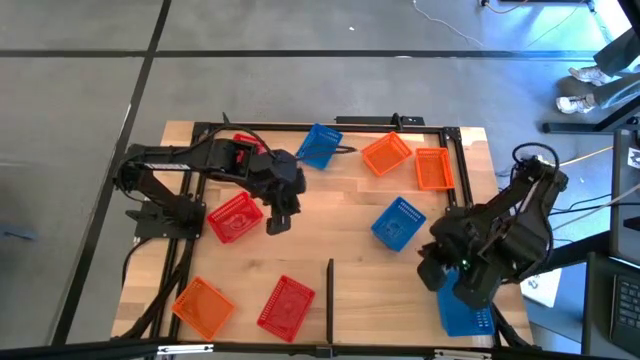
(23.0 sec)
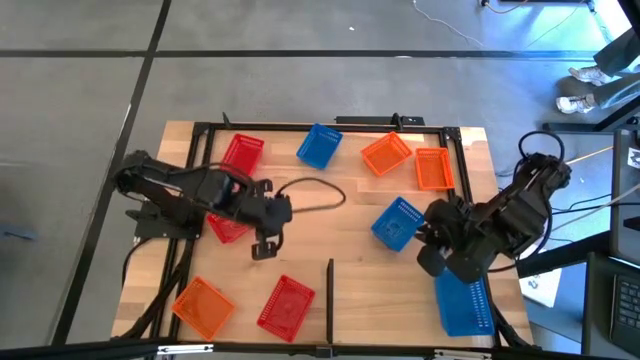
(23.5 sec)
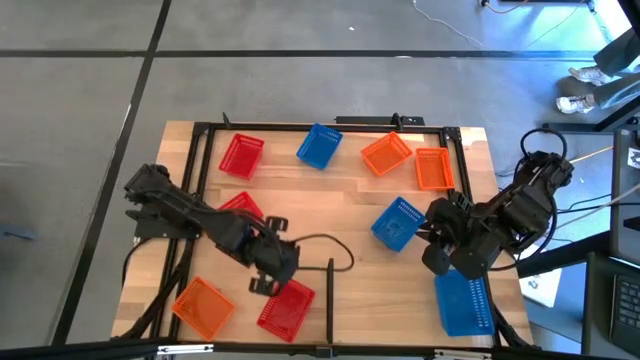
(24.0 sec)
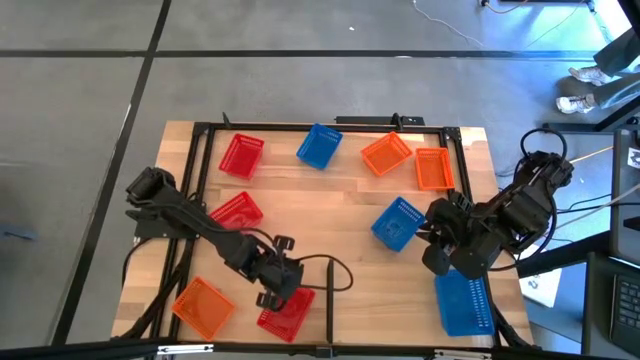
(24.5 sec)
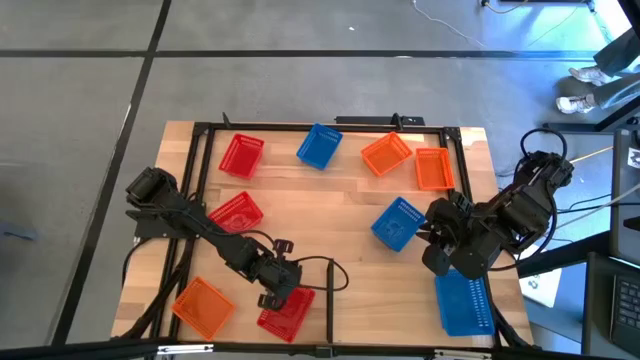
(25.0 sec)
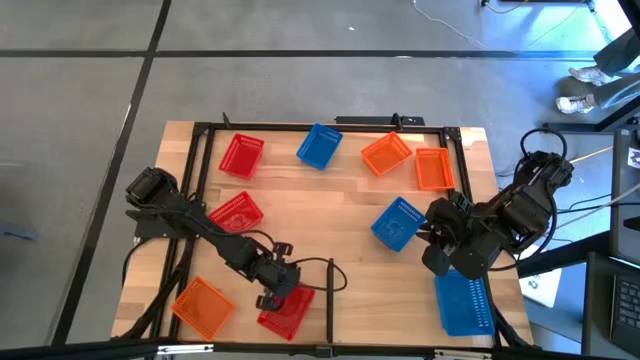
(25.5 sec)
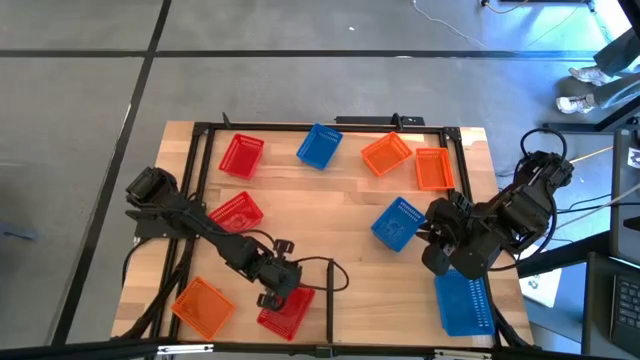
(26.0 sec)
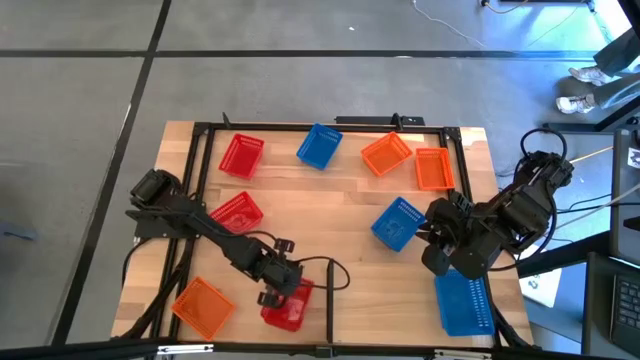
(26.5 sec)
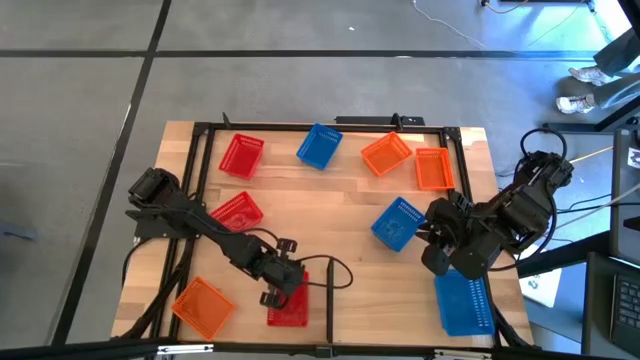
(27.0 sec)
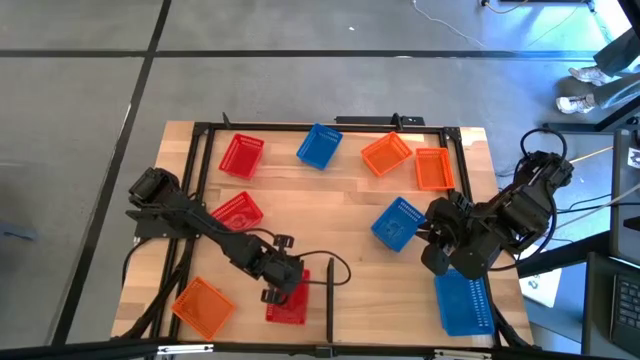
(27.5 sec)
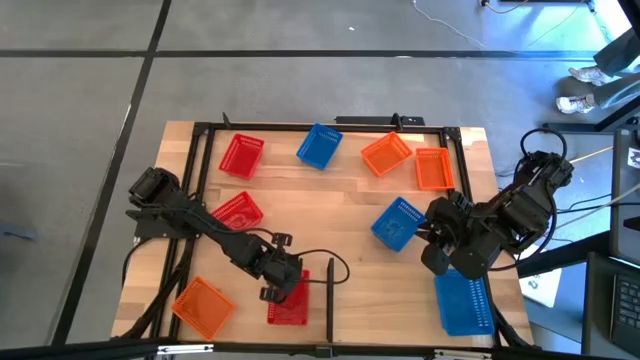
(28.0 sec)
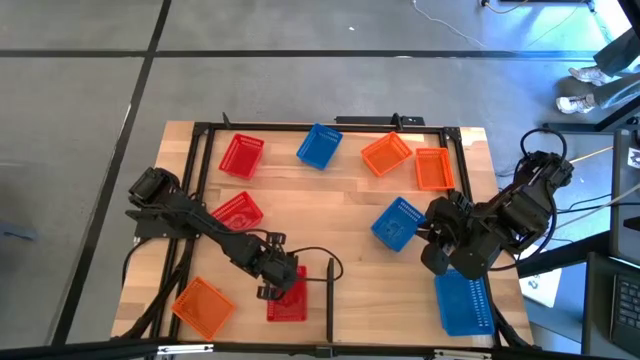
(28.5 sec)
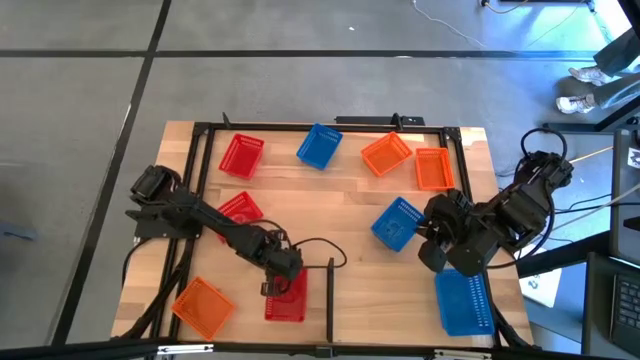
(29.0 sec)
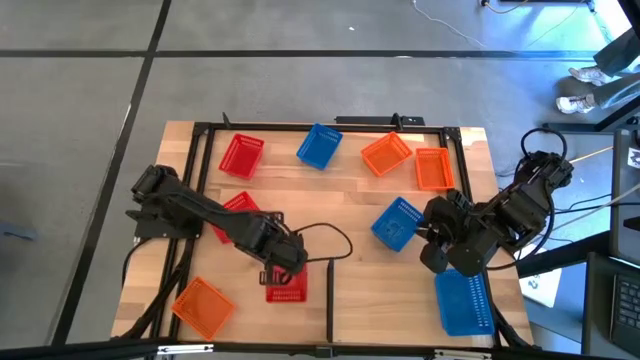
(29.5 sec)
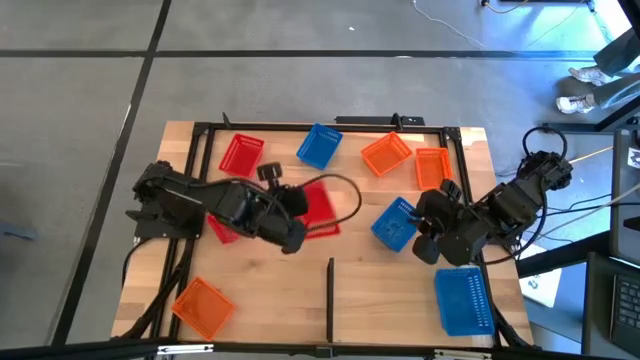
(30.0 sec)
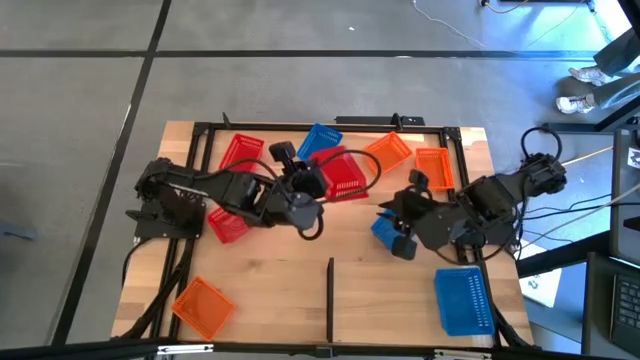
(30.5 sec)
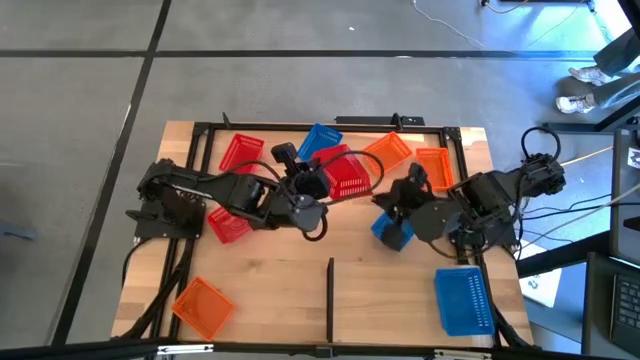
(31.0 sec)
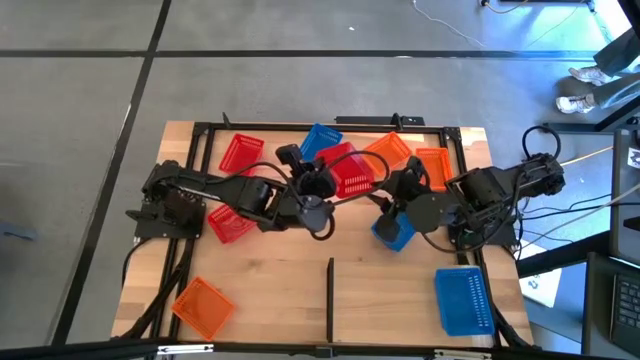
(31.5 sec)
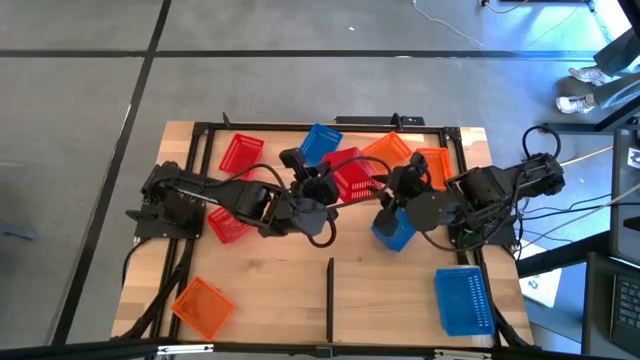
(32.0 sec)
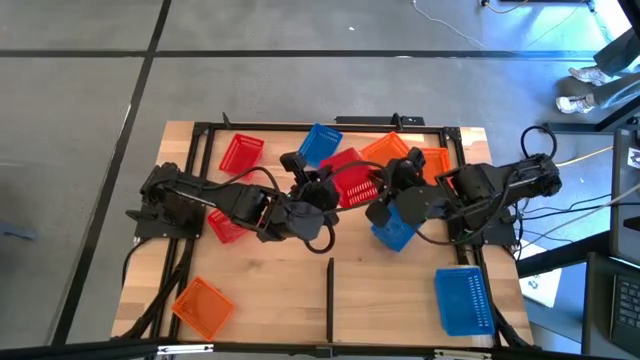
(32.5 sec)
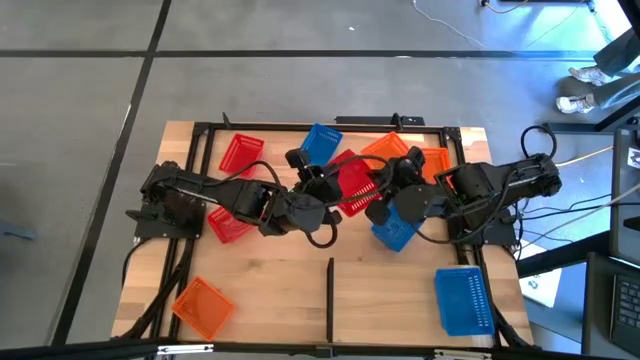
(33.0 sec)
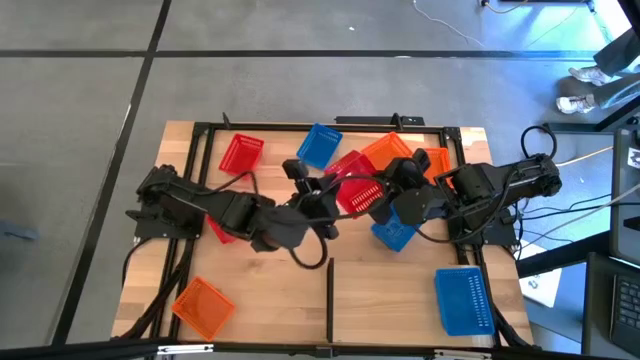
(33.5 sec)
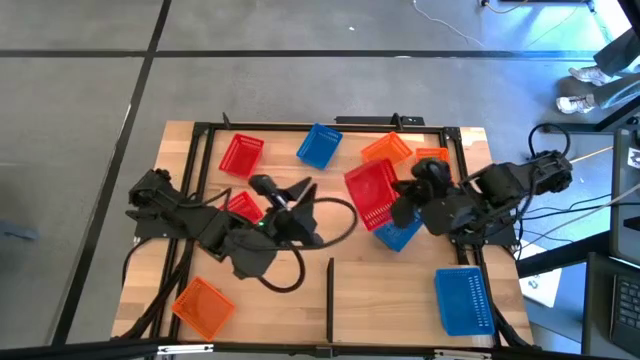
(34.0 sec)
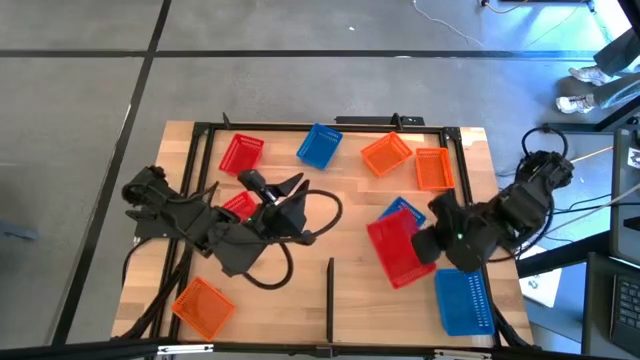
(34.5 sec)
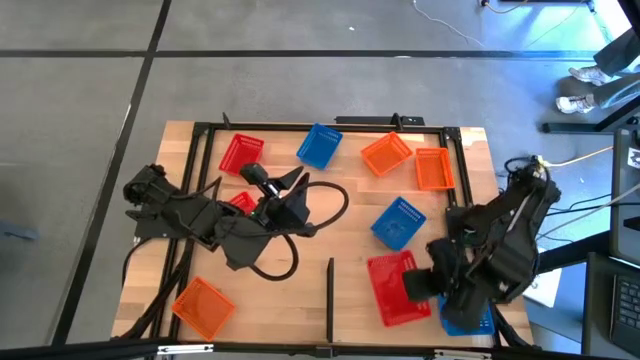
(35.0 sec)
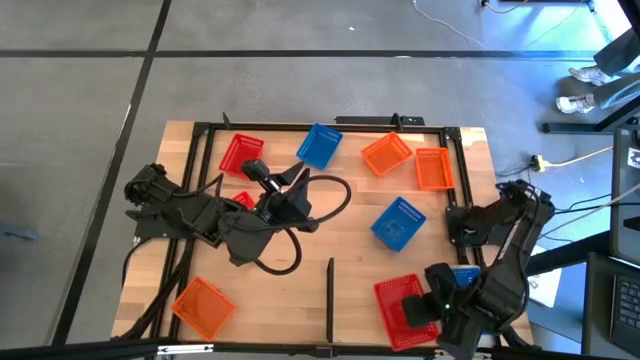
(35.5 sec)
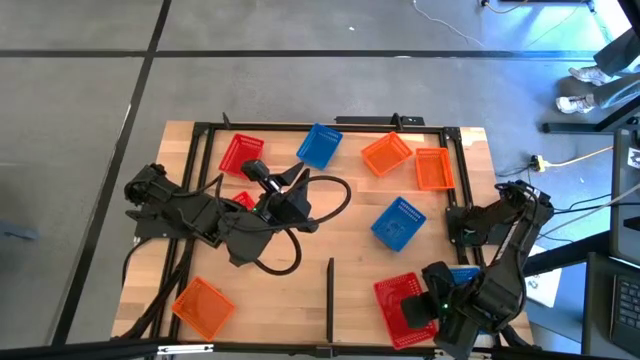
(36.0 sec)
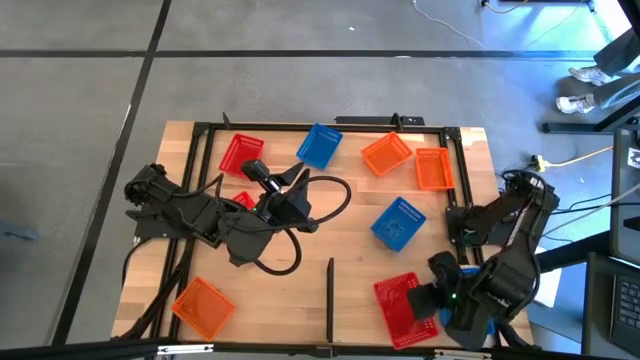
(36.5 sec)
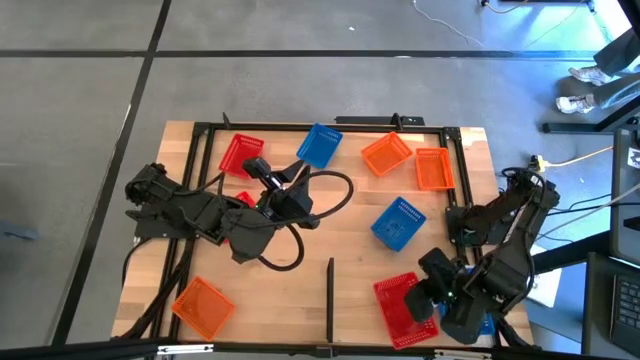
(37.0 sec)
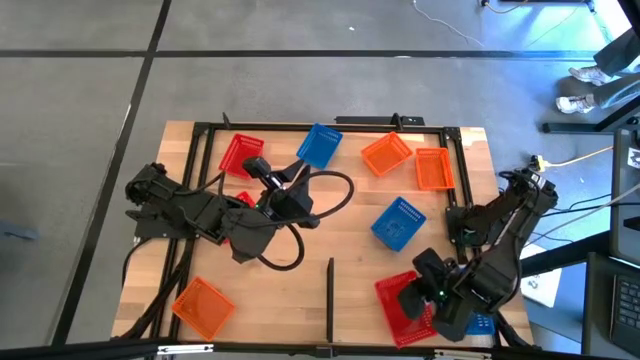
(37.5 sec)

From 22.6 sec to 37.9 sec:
Task: Stack baskets on shelf by color
Put the bottom red basket on the shelf

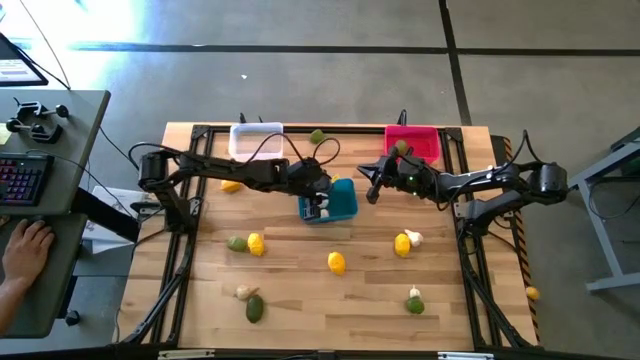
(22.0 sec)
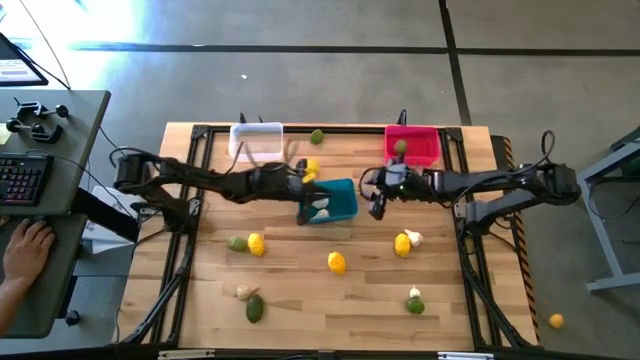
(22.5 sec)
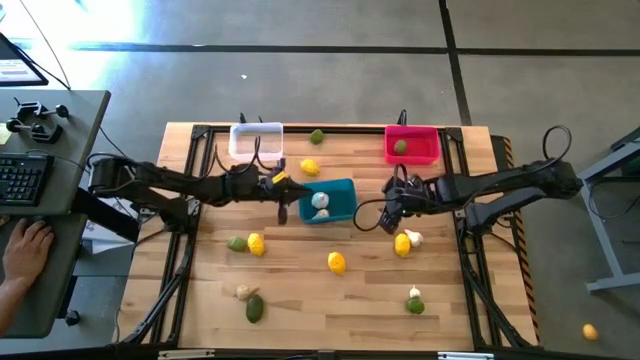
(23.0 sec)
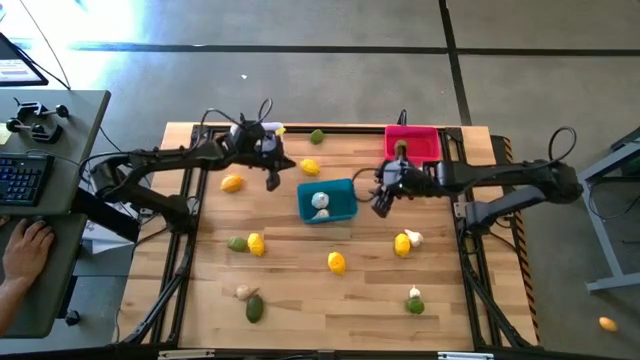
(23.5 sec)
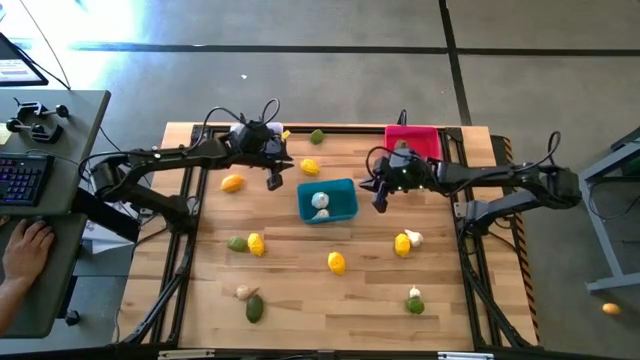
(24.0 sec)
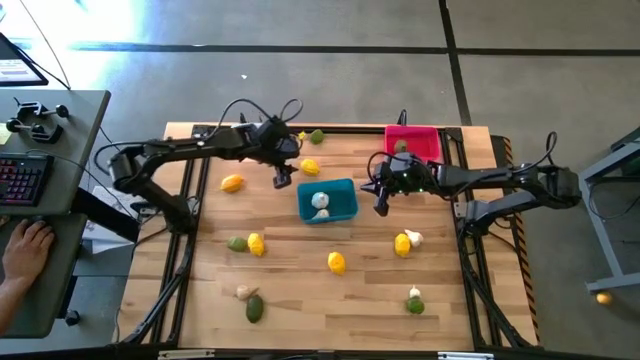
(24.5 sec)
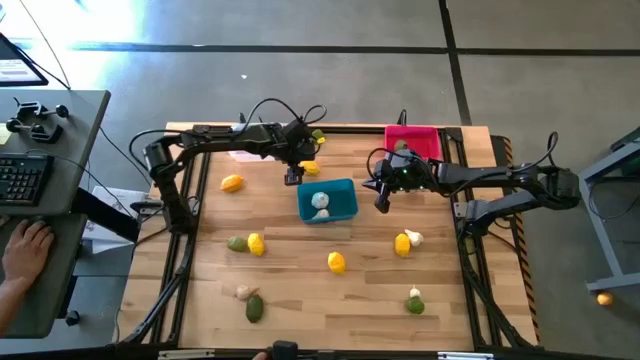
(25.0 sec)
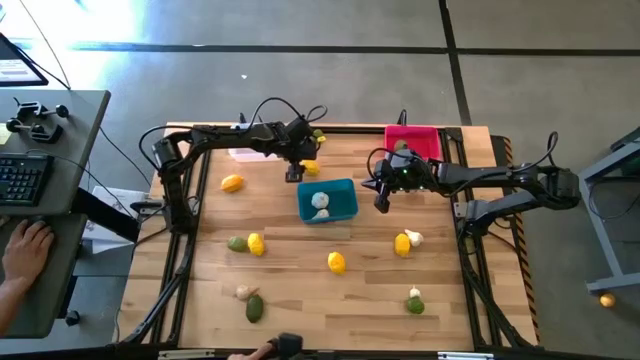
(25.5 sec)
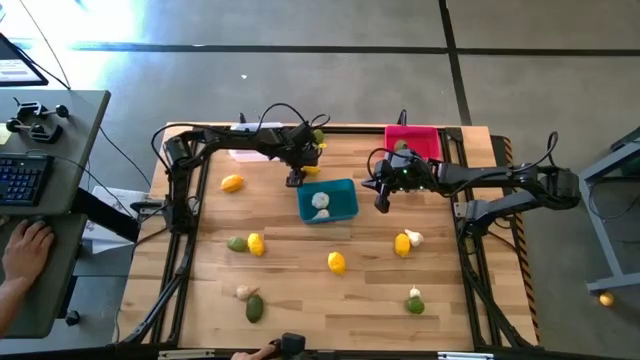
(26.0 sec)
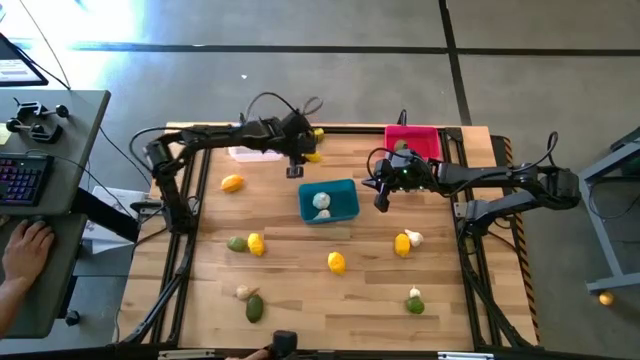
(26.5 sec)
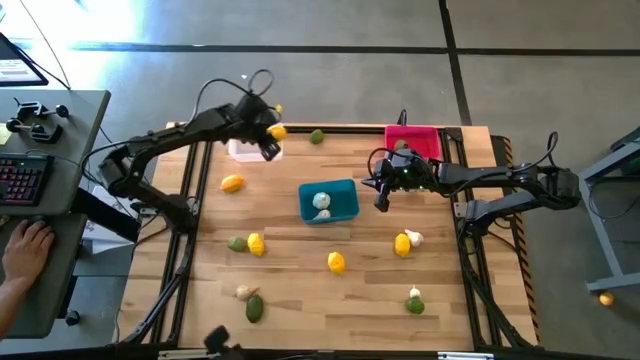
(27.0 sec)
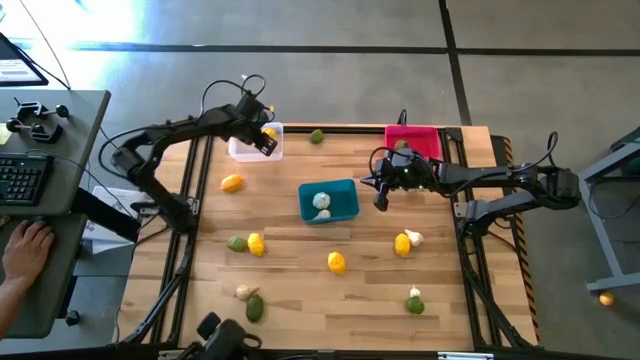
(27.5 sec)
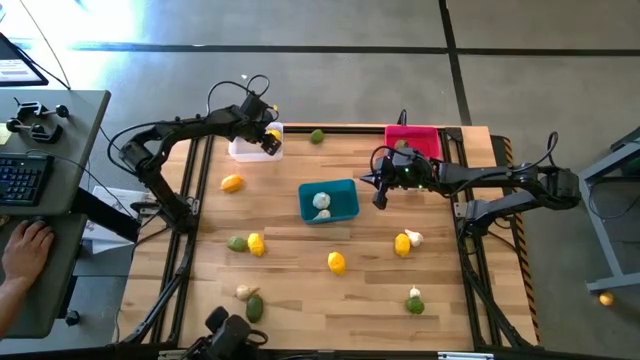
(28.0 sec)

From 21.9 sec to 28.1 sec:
Task: Sort produce into baskets
Put the lemon into the transparent bin
